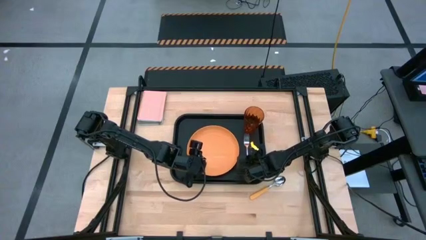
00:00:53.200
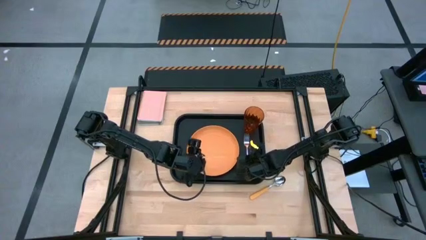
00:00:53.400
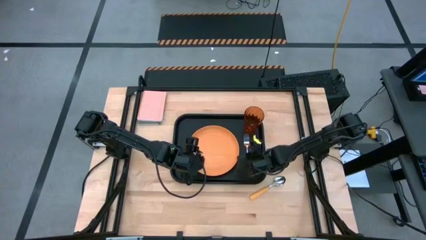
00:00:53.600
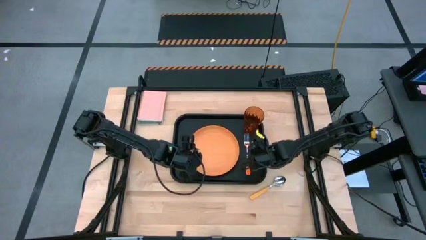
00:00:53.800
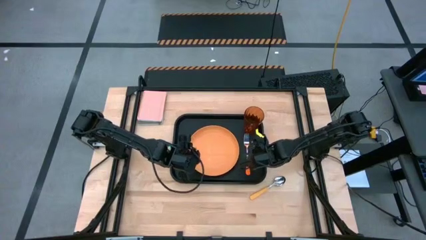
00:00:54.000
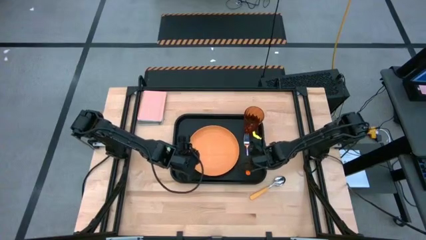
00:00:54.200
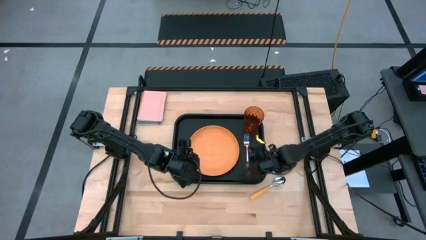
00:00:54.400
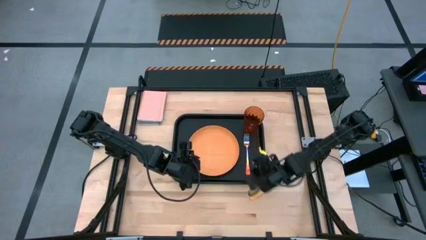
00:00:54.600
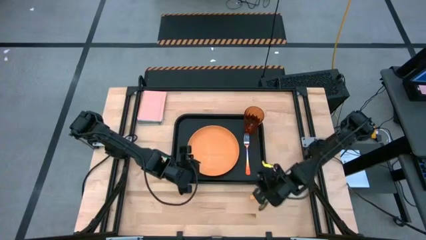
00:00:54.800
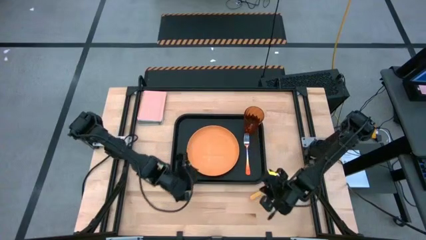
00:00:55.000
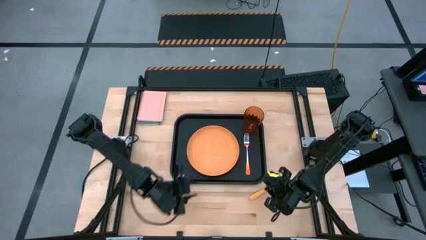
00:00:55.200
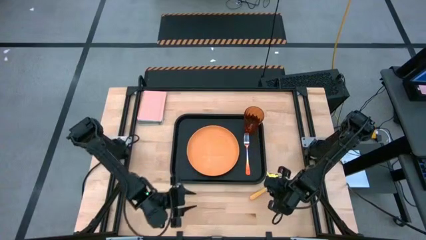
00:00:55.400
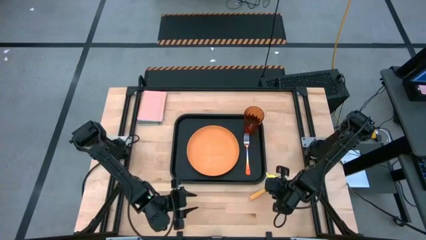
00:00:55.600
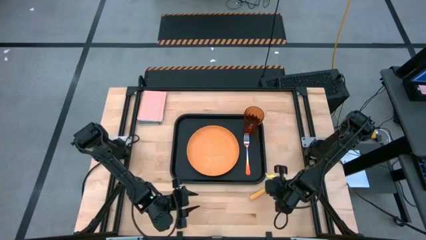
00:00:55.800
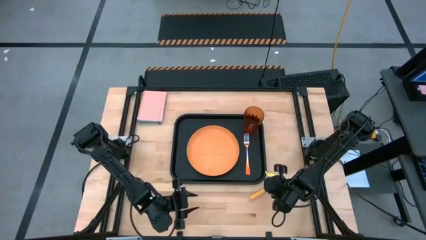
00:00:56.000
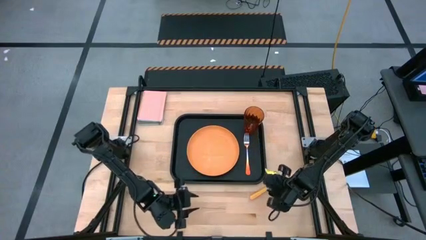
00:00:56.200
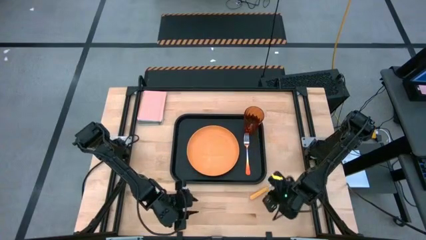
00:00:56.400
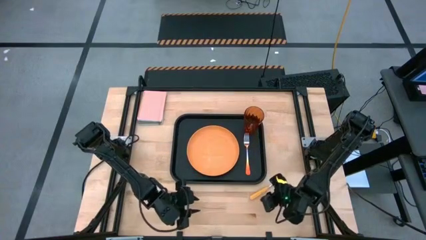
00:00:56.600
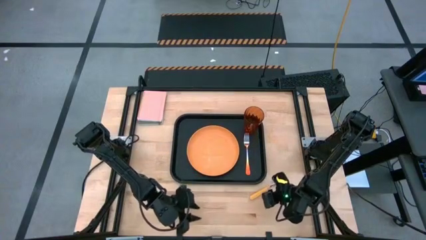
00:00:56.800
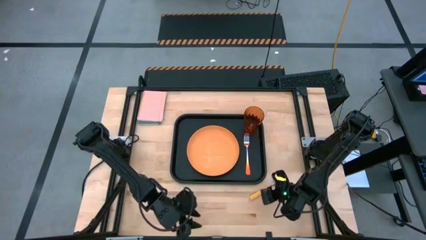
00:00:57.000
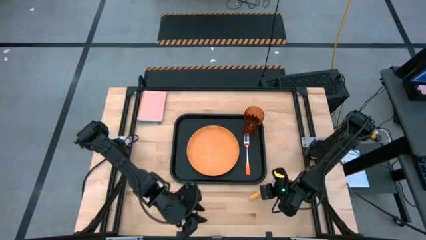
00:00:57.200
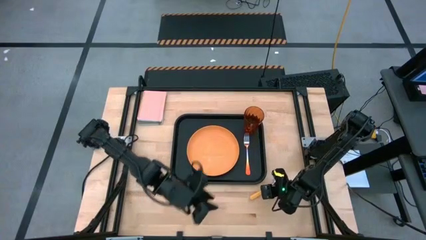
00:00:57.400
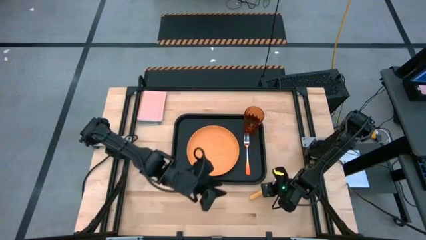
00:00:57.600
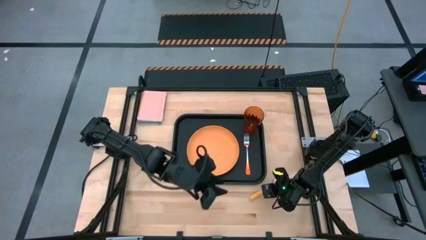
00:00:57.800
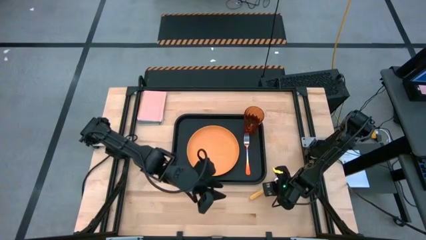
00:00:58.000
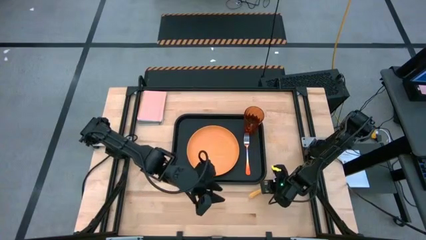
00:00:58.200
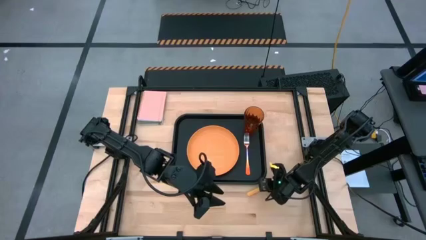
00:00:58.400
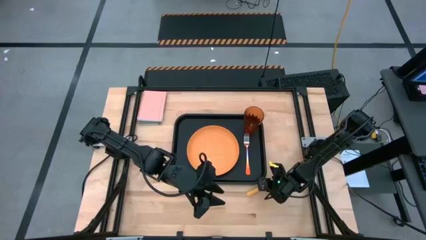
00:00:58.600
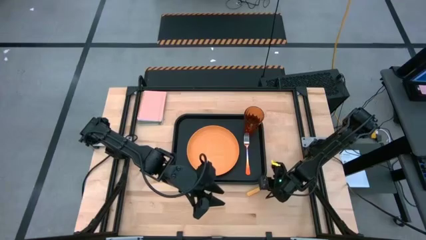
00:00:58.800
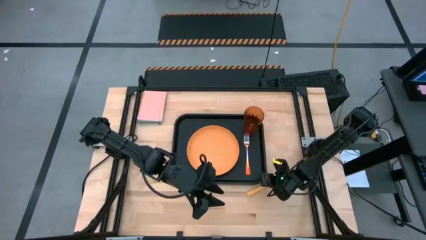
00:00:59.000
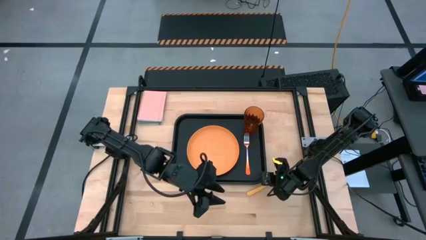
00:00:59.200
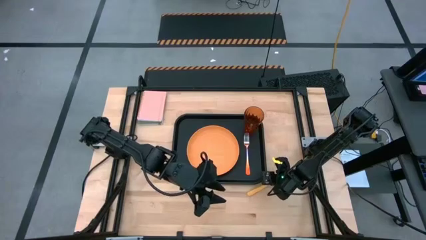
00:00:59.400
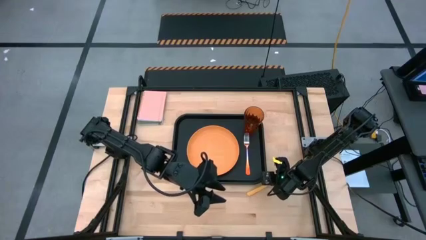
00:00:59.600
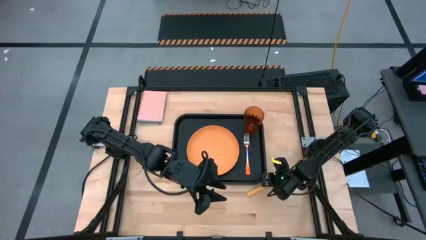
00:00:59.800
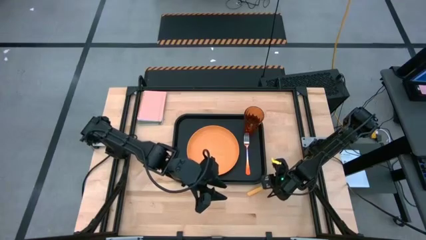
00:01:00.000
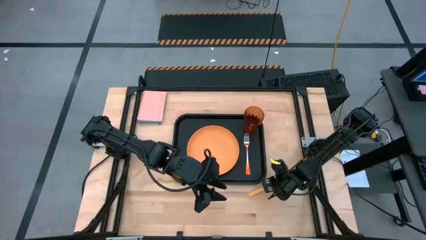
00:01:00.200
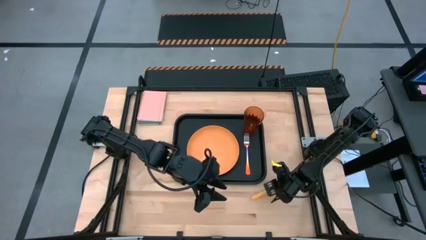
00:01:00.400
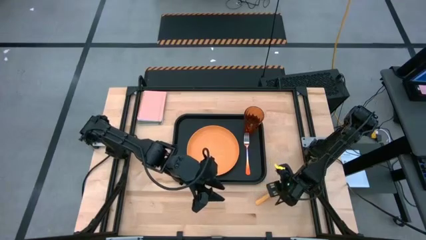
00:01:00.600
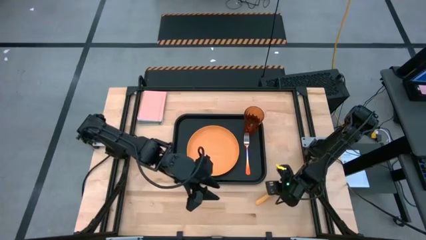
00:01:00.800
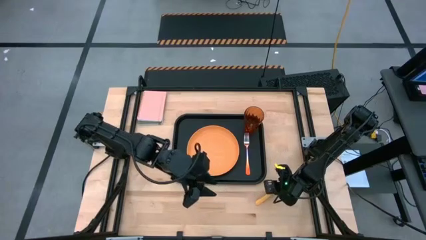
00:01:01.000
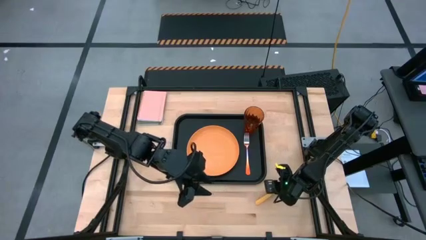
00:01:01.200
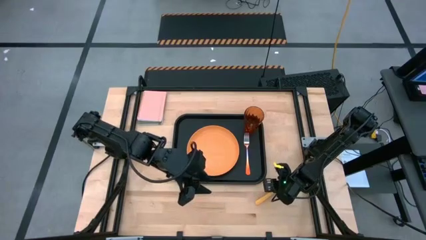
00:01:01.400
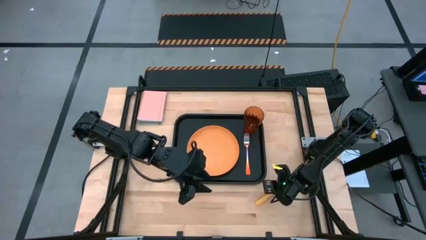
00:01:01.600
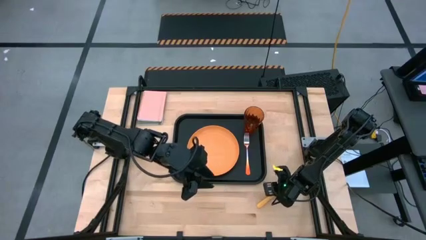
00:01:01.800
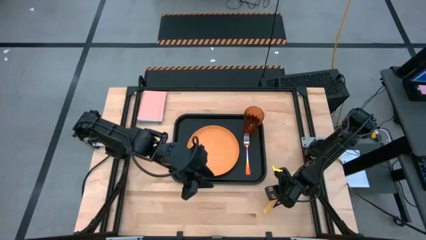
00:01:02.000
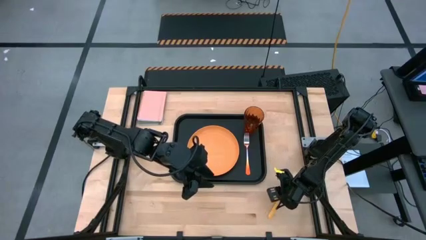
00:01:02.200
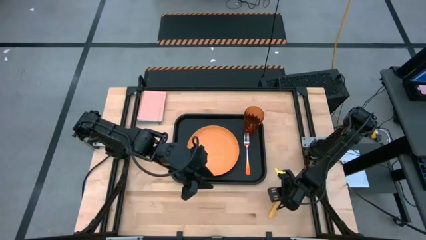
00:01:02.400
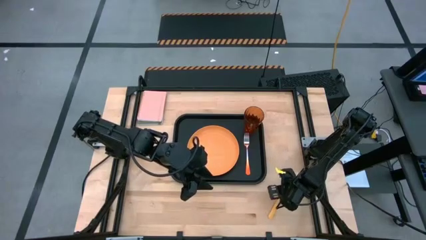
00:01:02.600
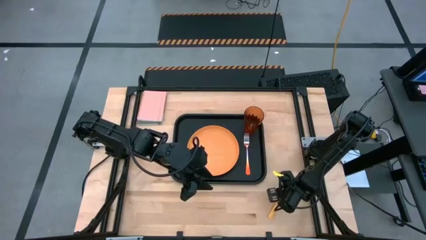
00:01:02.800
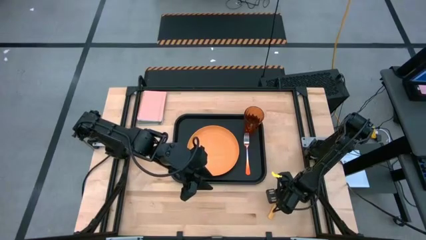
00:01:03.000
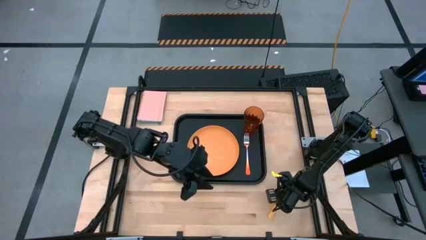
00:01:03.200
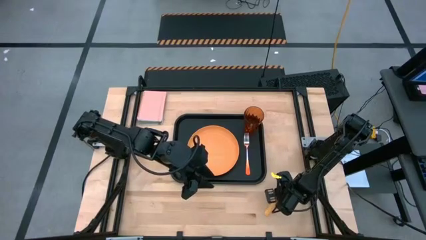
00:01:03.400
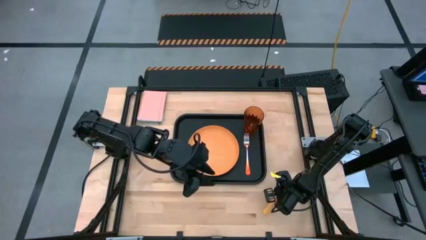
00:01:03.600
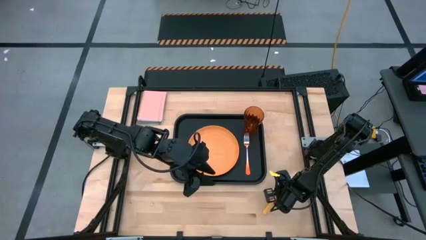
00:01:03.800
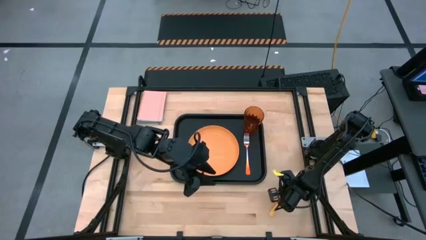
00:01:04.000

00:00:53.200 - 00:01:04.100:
Task: Pick and place plate/cup/fork/spoon on tray
Put the light orange spoon on the black tray to the right of the orange fork

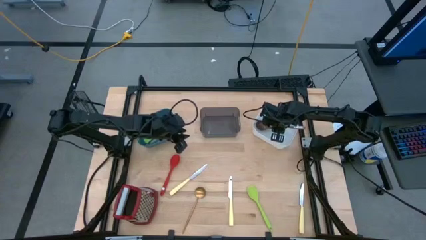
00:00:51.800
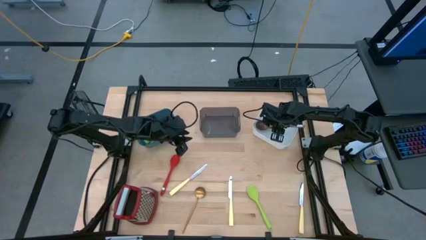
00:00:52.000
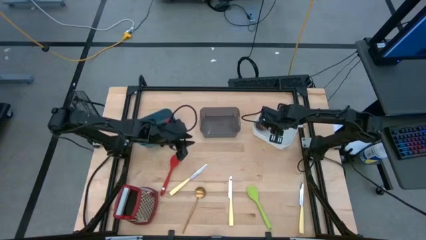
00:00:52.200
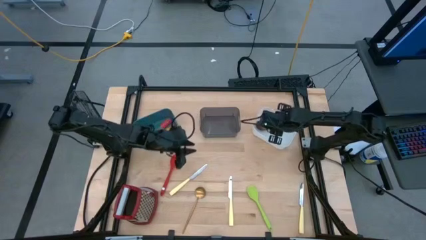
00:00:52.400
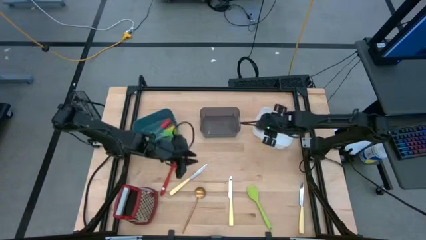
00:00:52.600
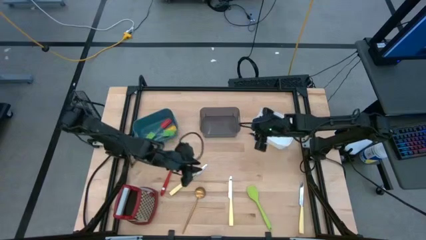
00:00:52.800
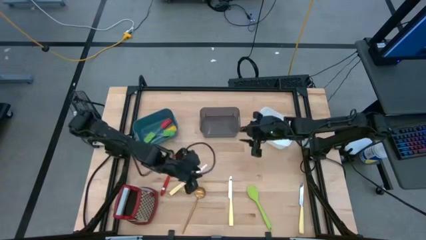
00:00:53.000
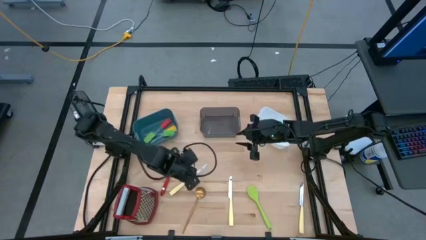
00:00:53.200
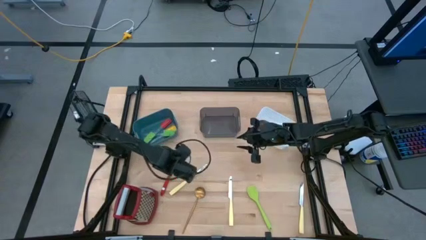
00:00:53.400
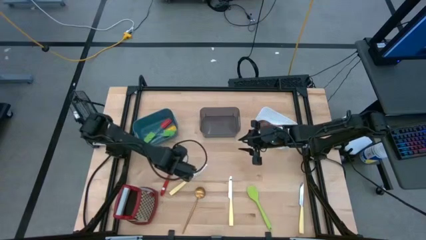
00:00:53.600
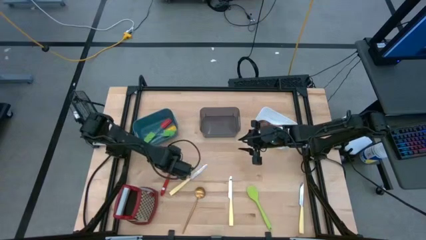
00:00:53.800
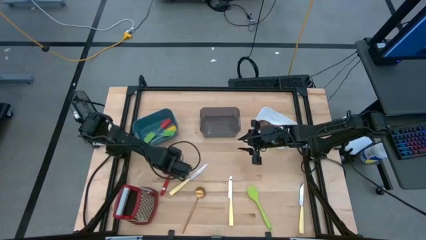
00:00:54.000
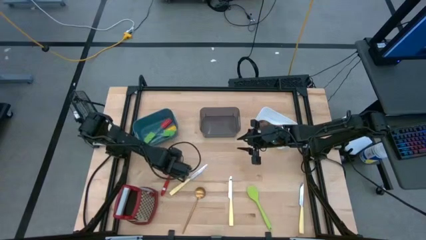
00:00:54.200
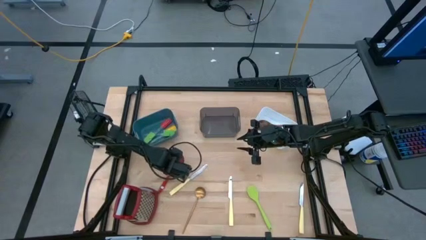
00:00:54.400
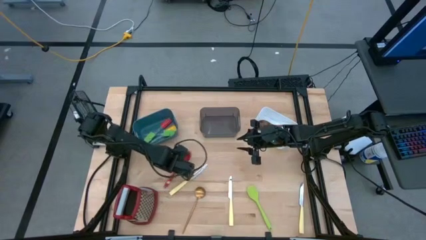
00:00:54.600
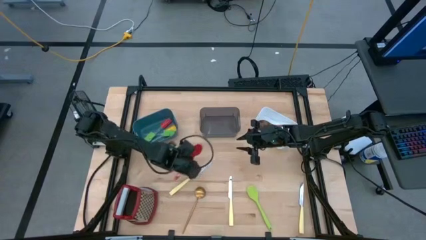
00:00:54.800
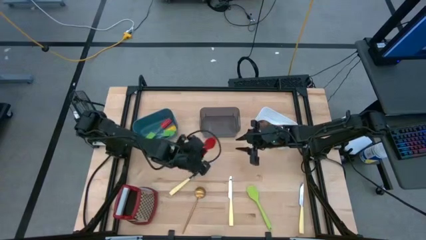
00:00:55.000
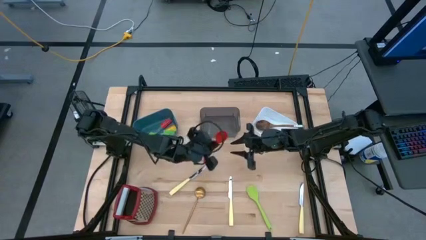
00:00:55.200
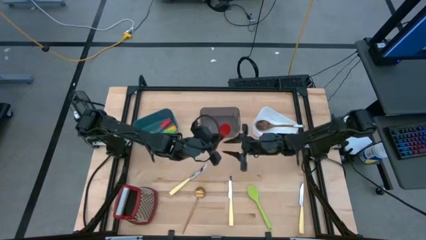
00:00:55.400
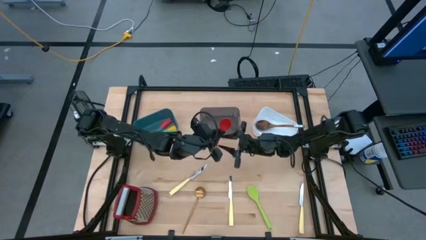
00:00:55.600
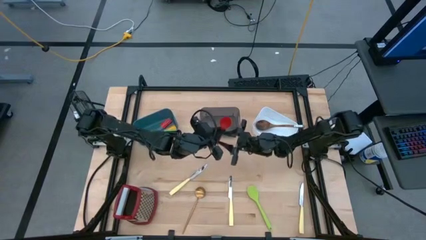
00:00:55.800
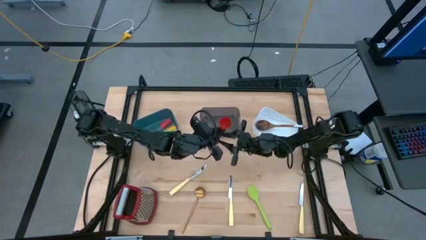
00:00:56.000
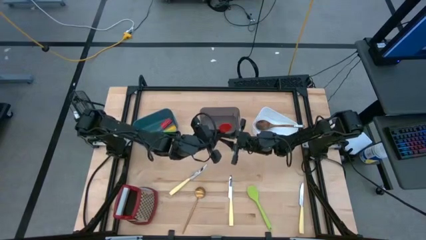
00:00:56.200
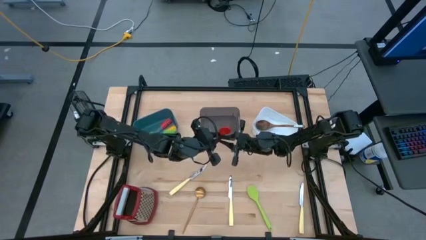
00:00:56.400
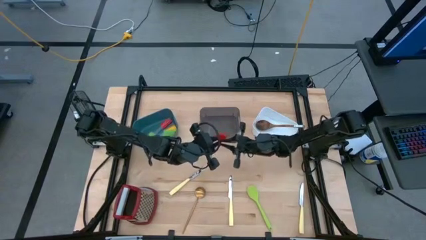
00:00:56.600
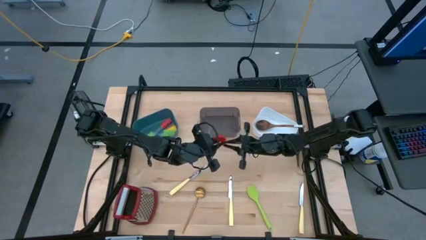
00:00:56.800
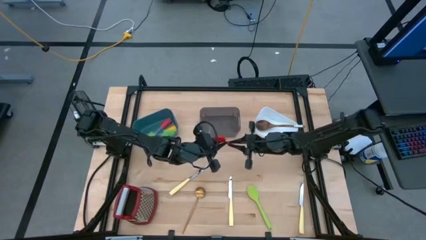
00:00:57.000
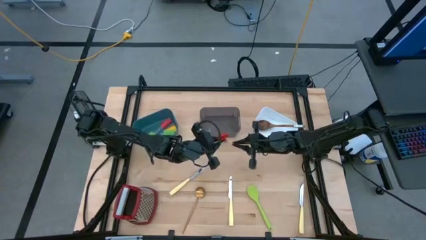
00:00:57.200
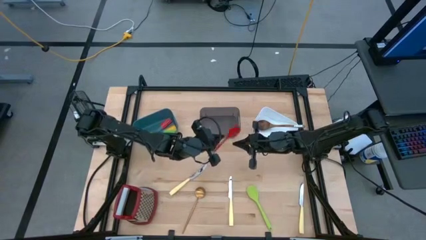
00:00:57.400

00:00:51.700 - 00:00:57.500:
Task: Pick & Place Kitchen Items
Put the red serving spoon into the white bin
